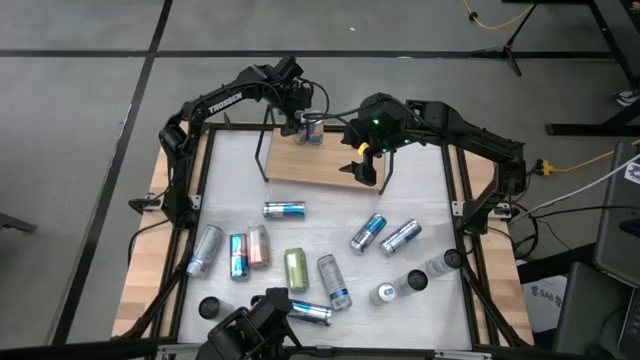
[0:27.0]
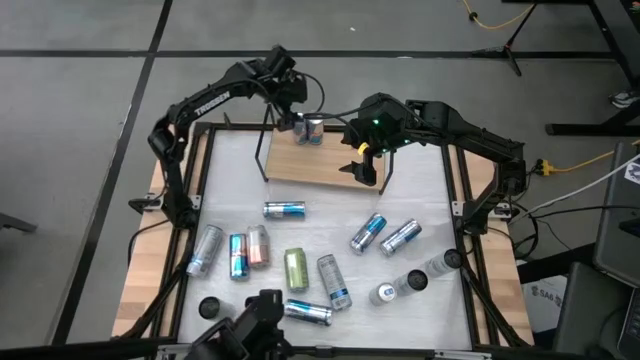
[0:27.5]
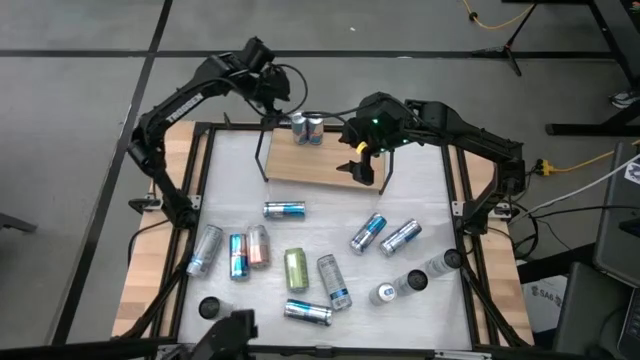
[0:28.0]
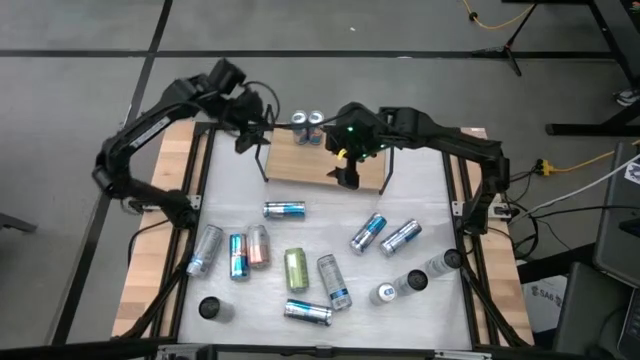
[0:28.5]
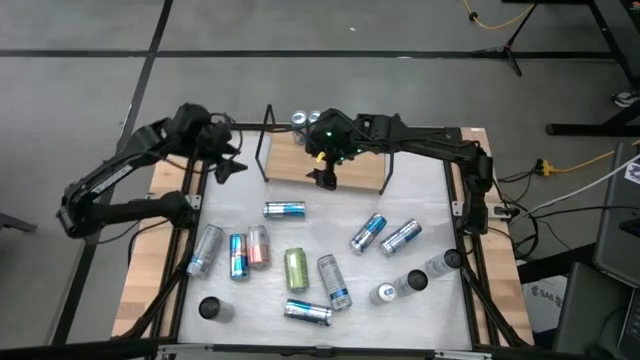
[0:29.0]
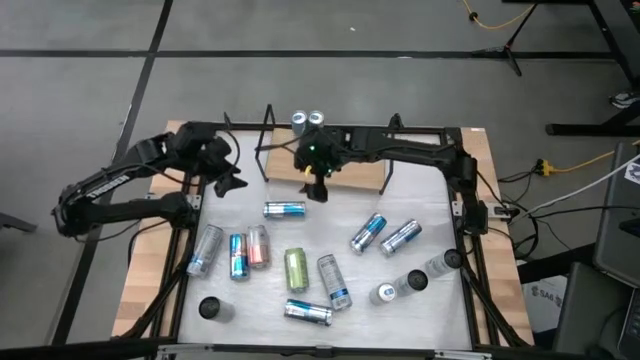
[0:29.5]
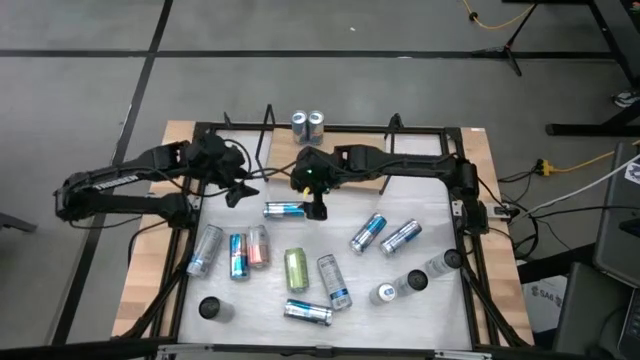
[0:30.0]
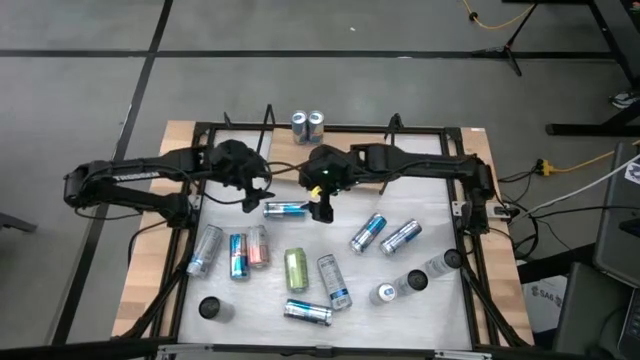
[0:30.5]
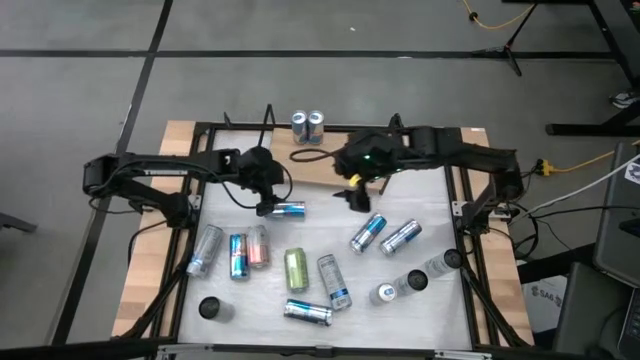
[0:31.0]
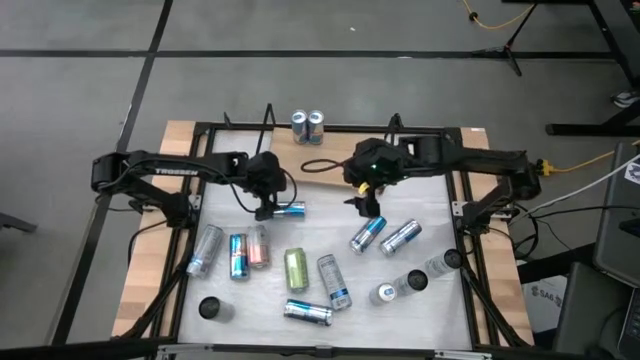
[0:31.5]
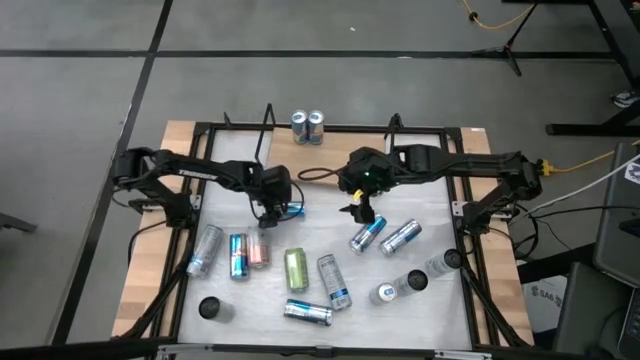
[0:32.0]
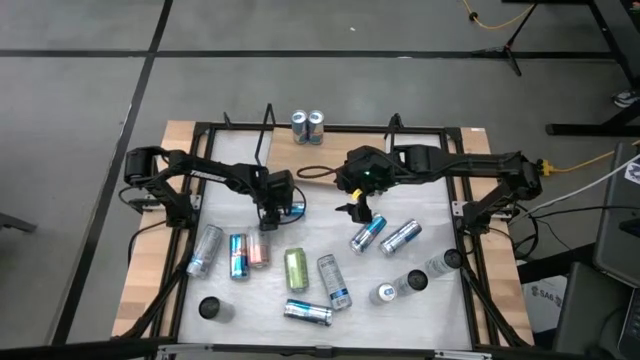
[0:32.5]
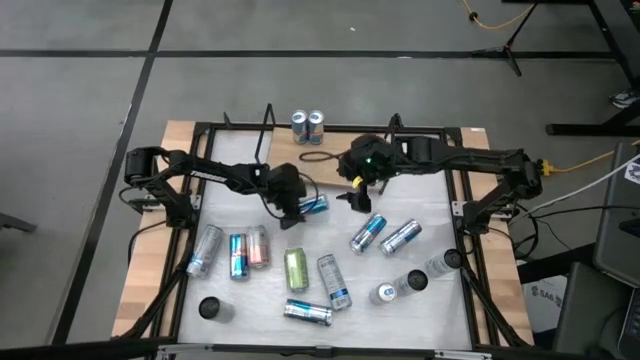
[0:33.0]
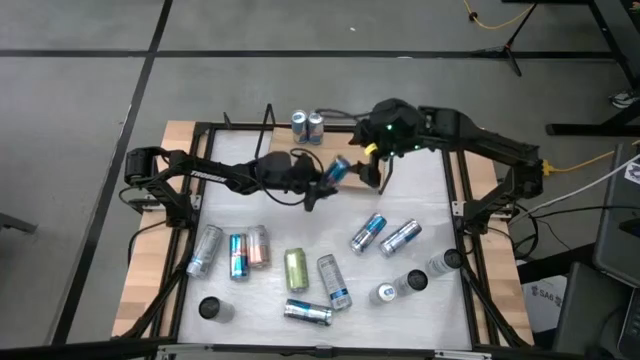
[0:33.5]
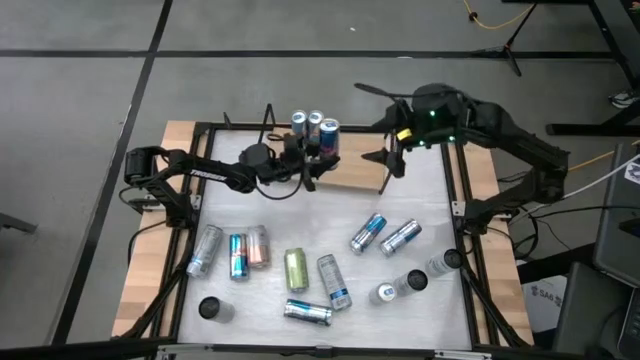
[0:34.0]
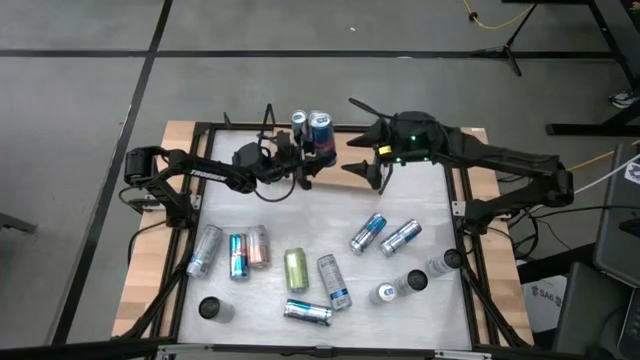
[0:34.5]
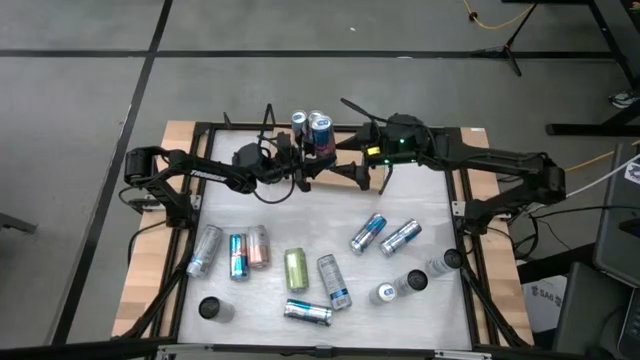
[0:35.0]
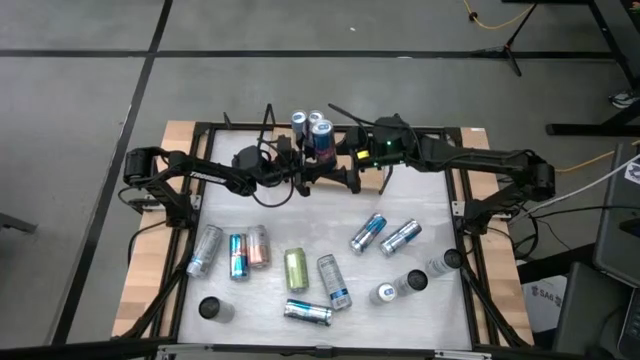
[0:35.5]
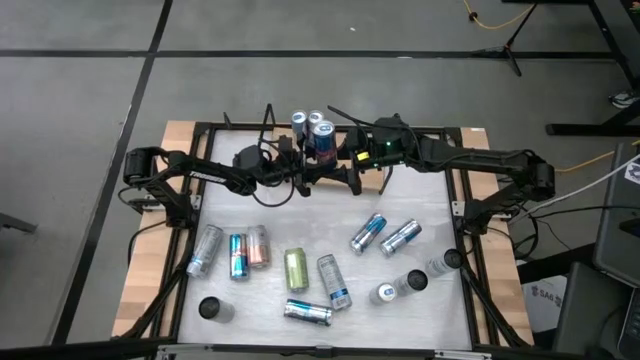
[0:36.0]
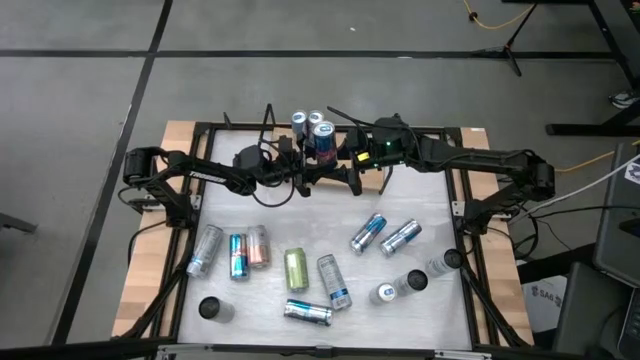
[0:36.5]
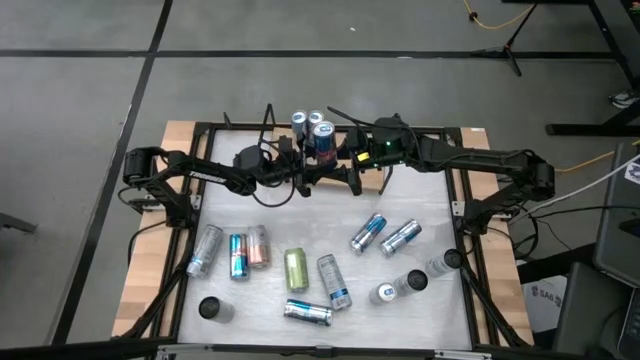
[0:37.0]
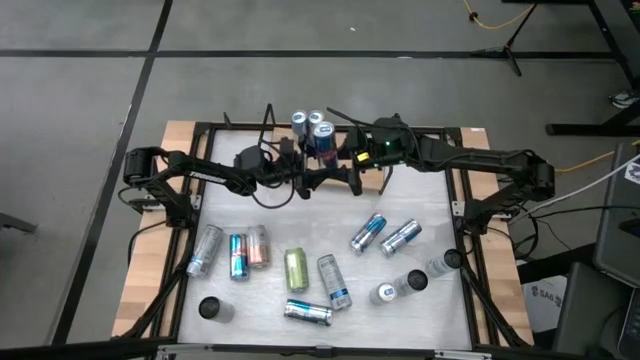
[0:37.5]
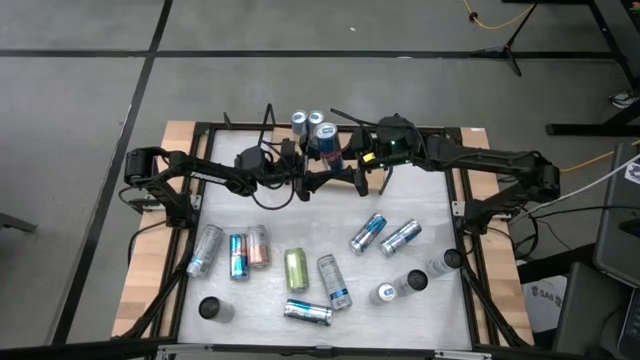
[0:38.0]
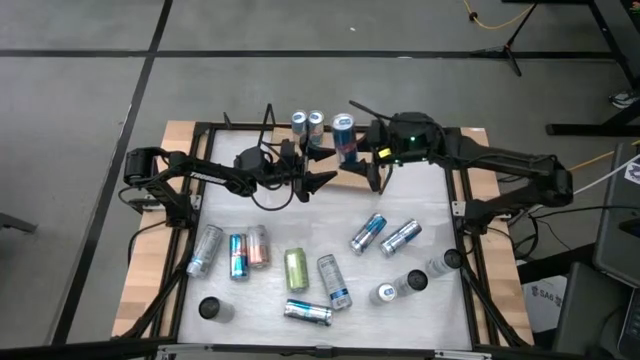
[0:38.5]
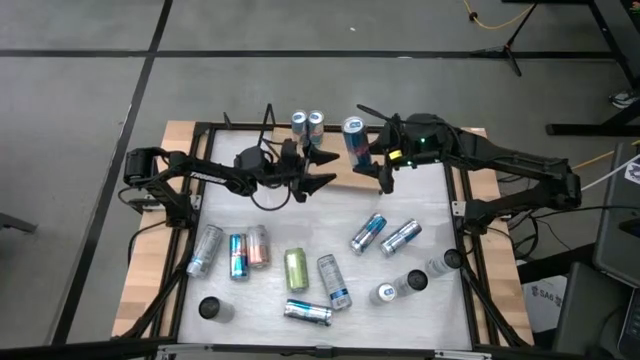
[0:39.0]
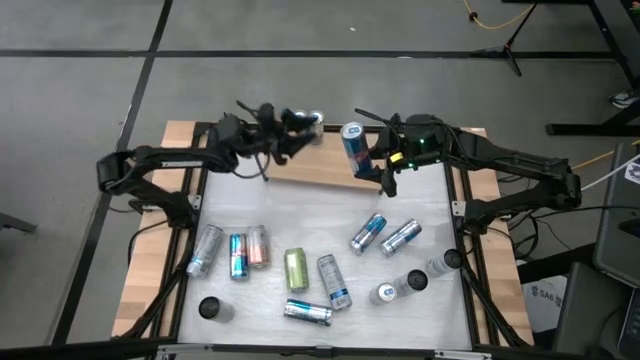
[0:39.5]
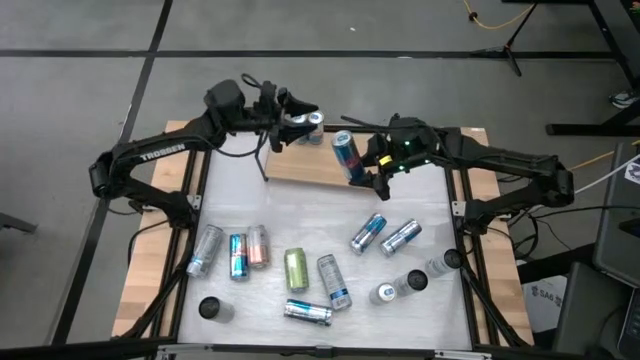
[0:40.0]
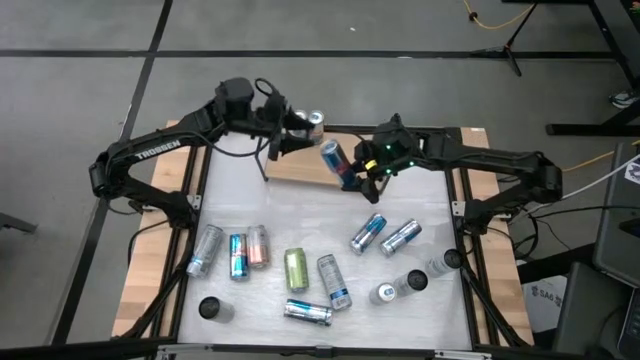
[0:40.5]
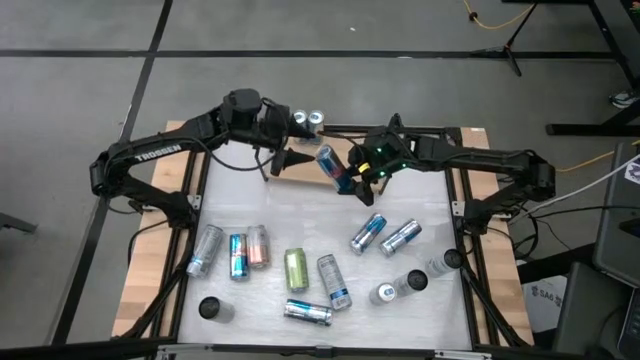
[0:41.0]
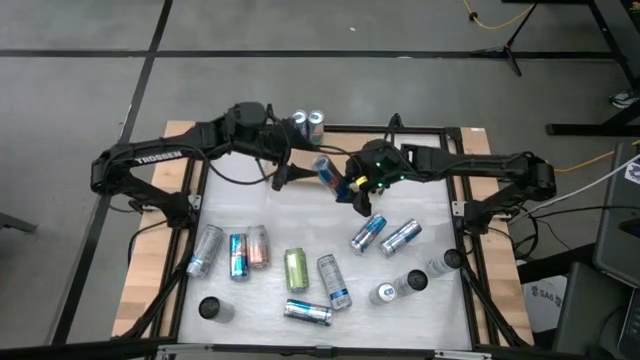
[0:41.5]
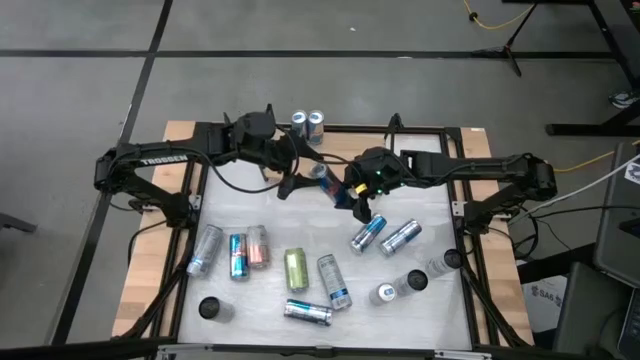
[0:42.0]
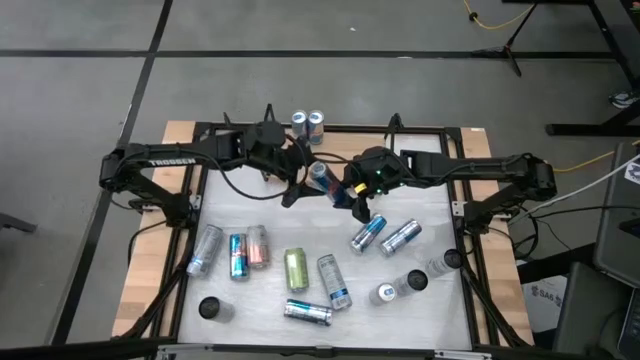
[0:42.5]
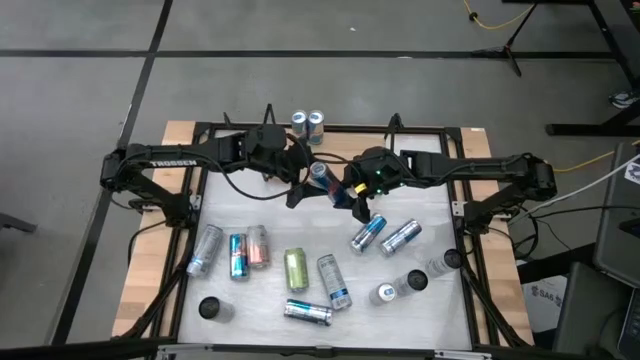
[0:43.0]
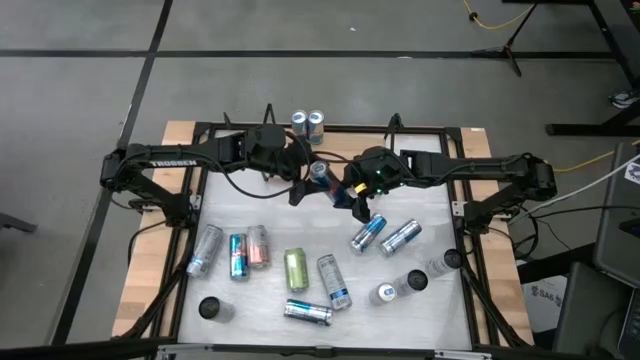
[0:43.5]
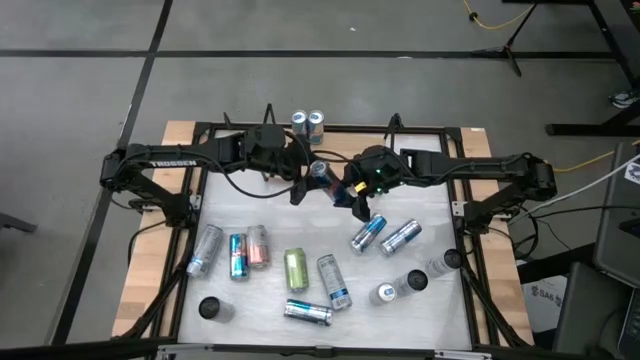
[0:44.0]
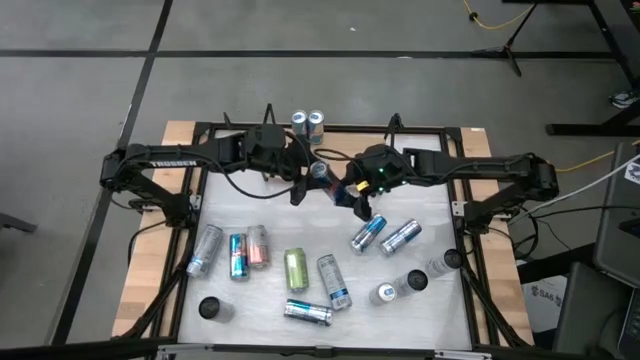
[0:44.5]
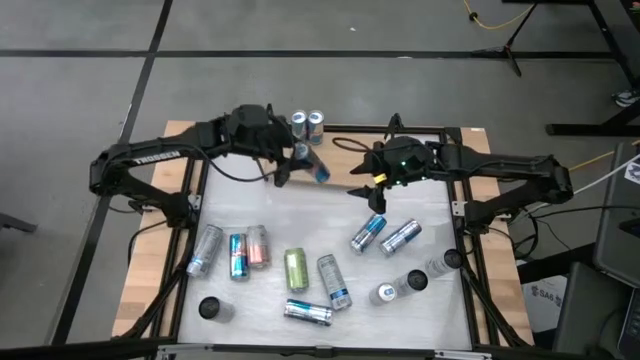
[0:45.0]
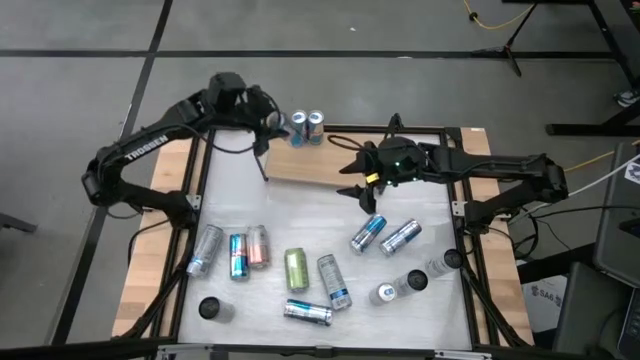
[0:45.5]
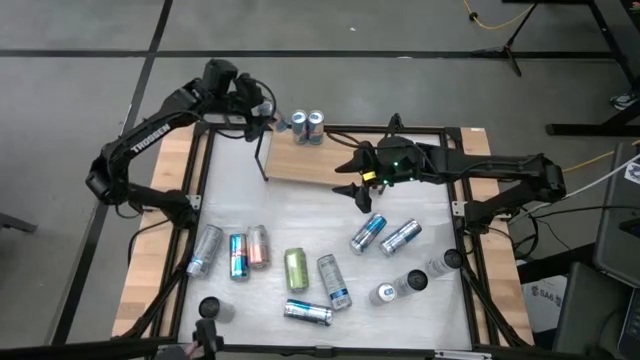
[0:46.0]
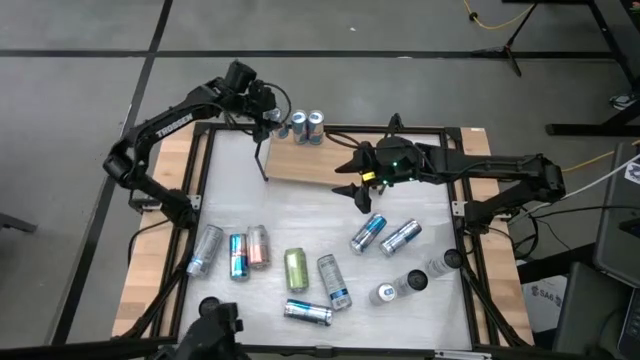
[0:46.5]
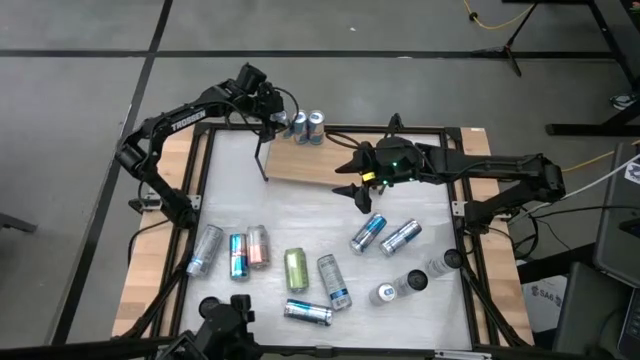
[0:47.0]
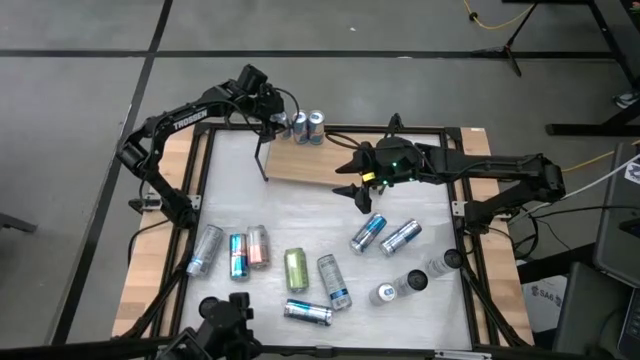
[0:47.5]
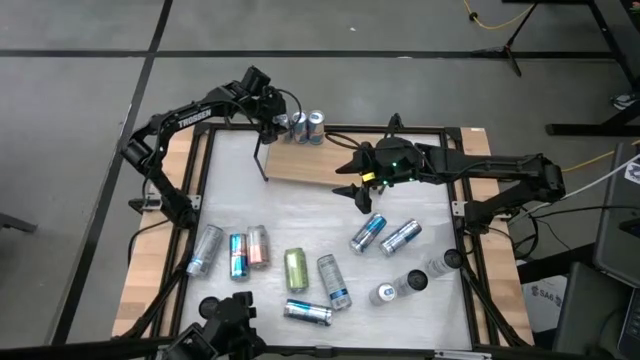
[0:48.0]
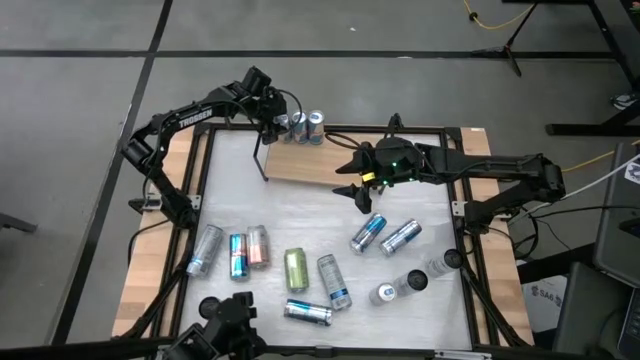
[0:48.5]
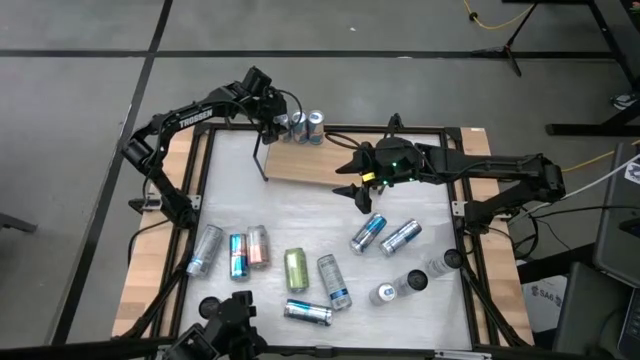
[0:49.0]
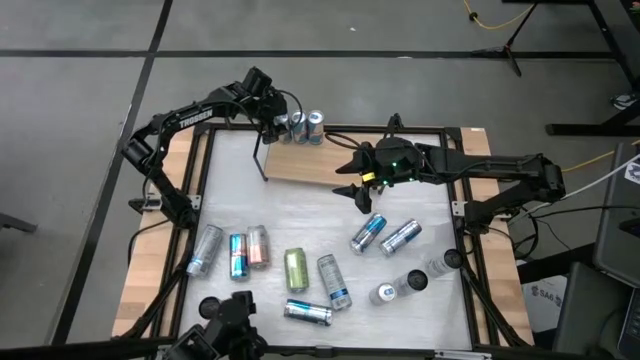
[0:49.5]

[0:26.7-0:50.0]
Task: Place canned beverage on shelf
Put the blue soda can on the shelf
